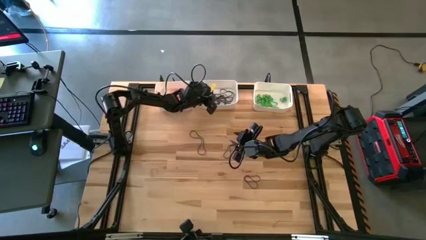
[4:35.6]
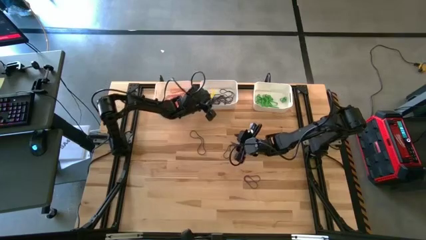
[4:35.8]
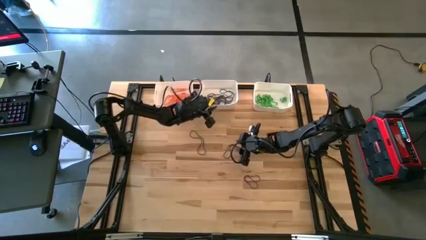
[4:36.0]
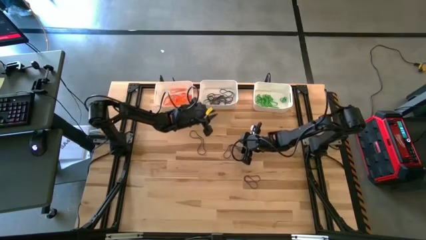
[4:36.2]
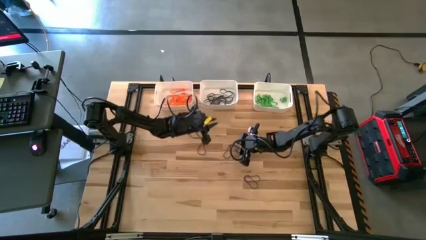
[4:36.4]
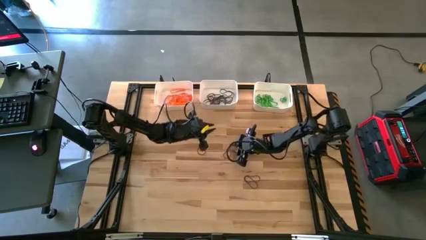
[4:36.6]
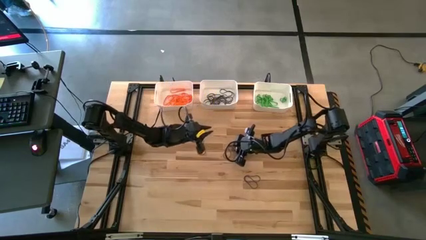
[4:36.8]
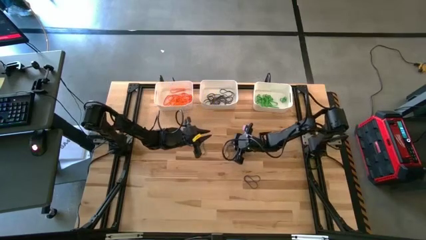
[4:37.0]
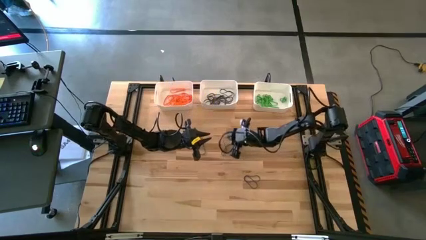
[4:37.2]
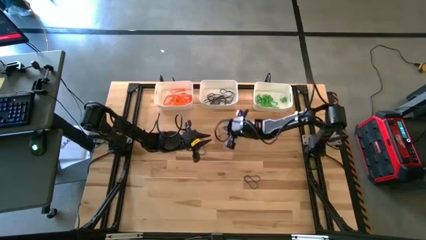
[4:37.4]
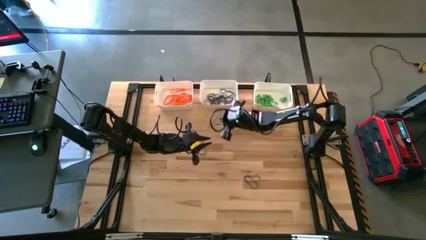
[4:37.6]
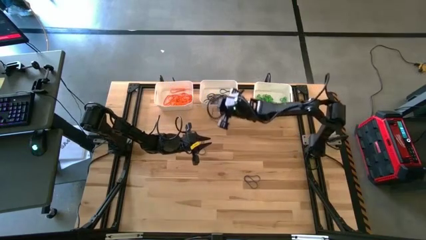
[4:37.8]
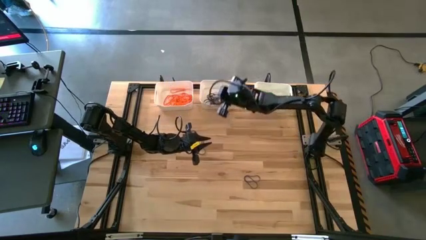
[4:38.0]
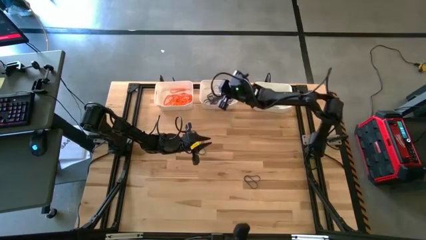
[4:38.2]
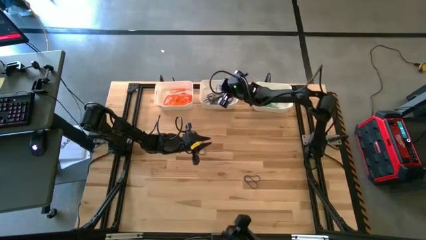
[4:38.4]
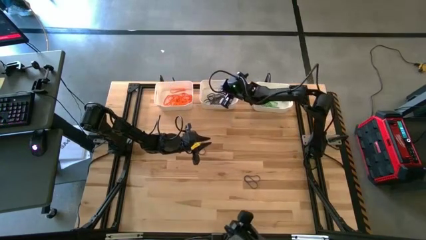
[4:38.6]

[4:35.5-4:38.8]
Task: Sort rubber bands into baskets
Put the purple rubber band into the middle white bin

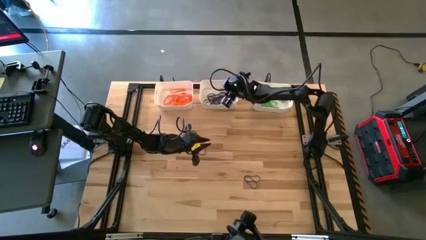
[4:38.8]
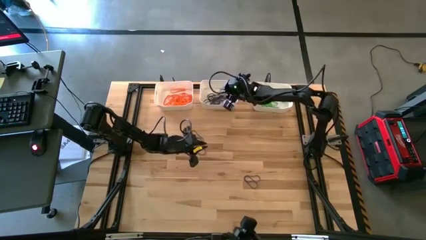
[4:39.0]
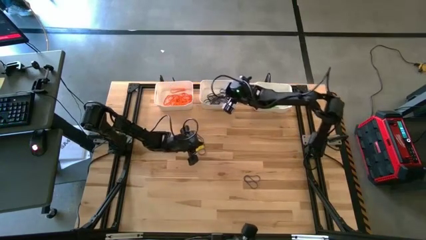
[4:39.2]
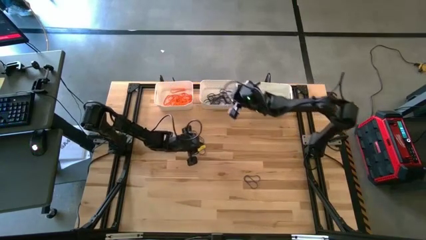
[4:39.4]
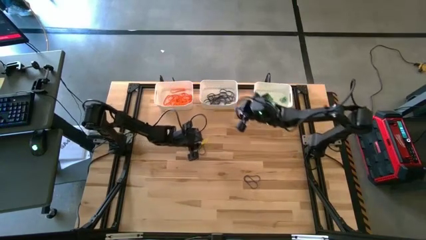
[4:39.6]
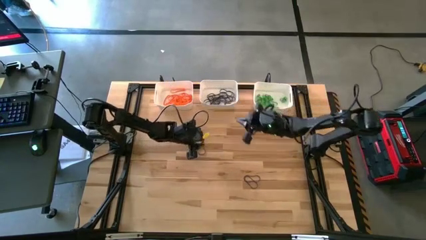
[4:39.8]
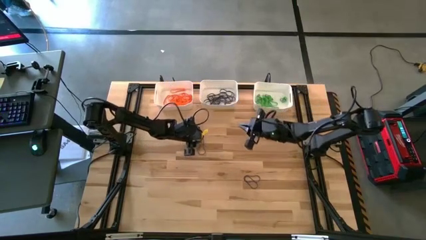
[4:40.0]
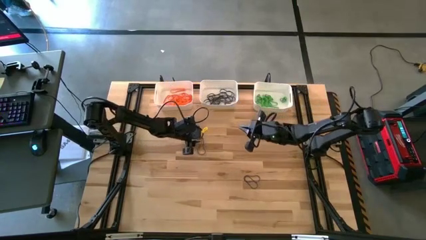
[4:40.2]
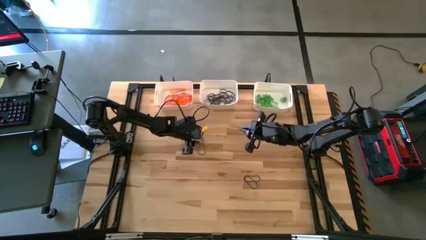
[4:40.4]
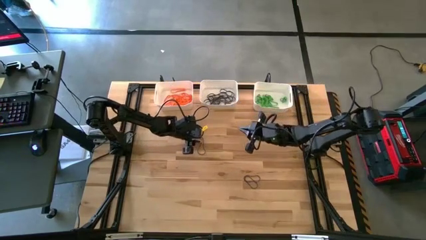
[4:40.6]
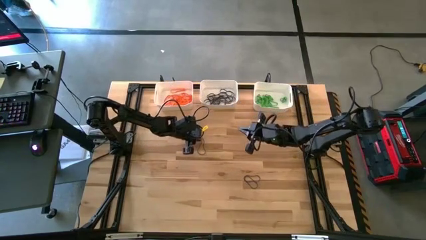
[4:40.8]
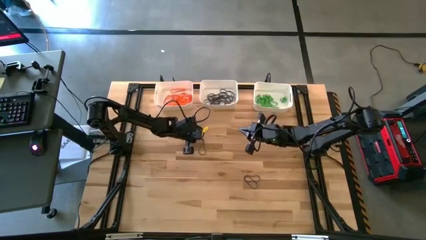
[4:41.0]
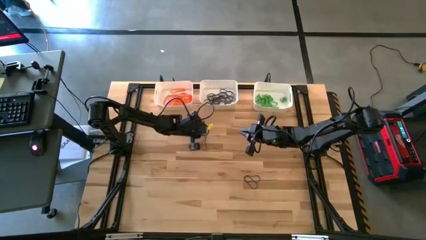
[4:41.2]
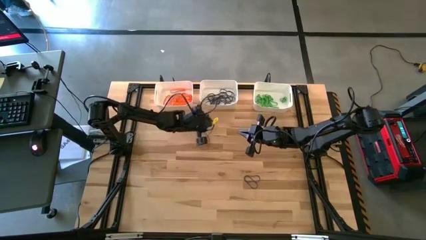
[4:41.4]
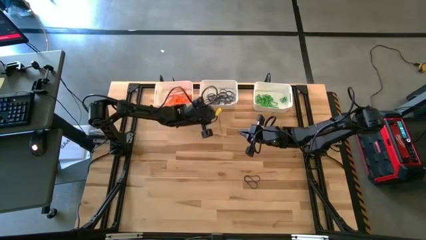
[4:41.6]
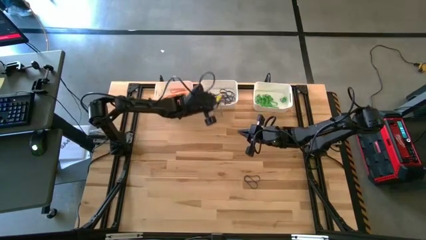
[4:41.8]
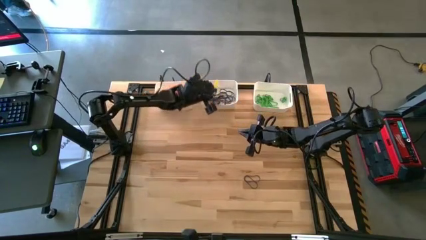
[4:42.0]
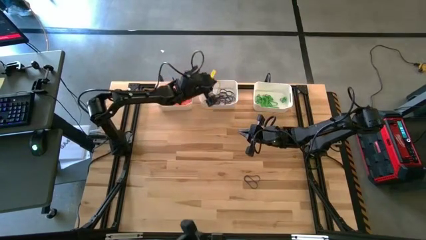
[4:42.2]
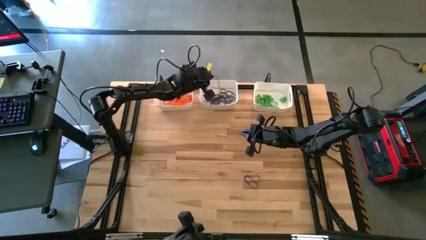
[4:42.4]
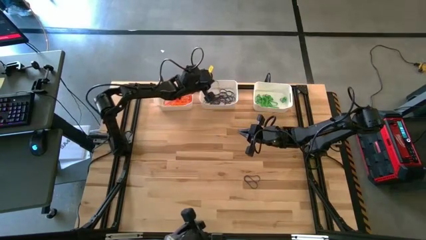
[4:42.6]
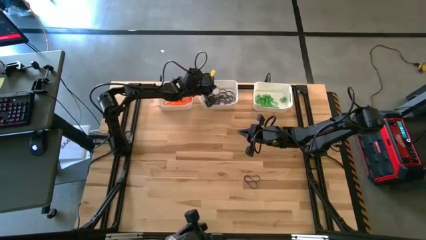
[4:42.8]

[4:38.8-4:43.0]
Put the purple rubber band into the middle white bin

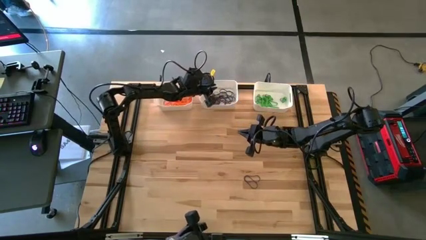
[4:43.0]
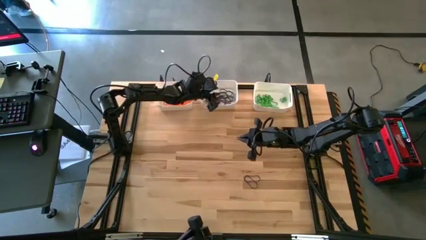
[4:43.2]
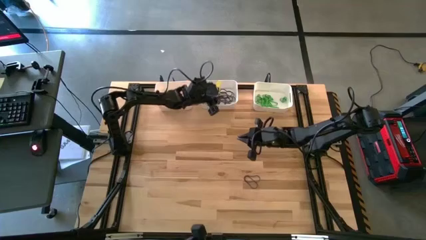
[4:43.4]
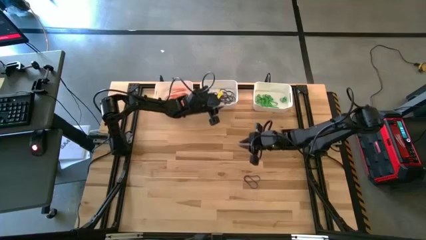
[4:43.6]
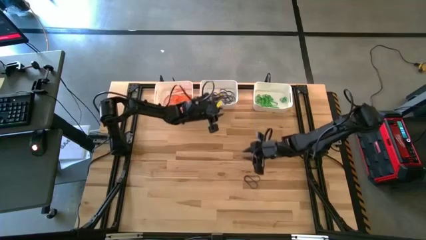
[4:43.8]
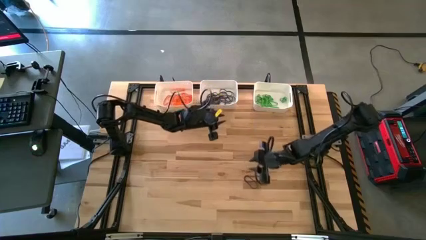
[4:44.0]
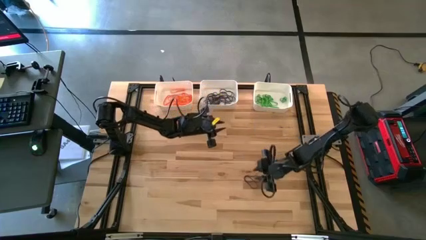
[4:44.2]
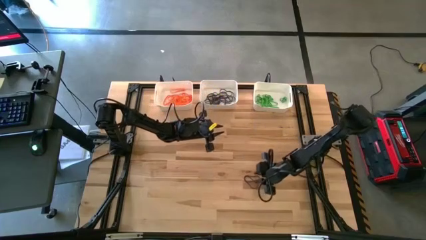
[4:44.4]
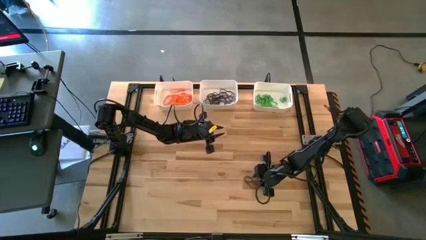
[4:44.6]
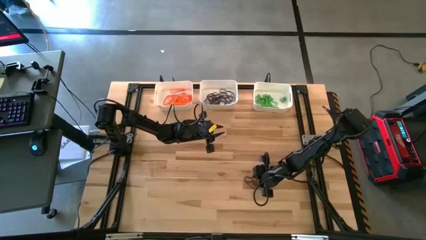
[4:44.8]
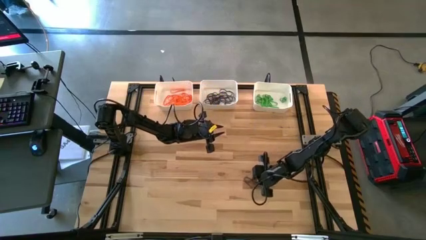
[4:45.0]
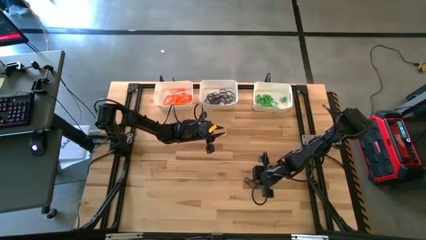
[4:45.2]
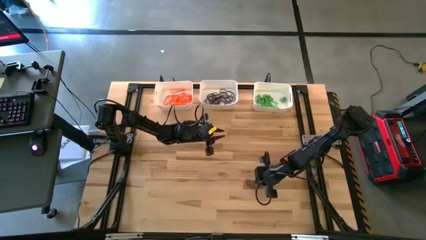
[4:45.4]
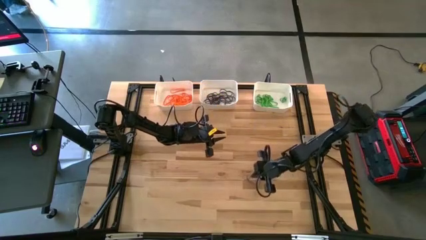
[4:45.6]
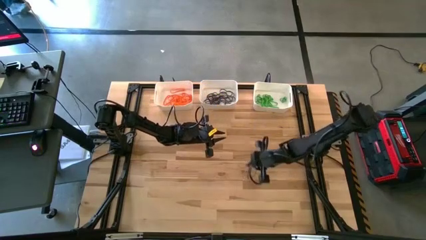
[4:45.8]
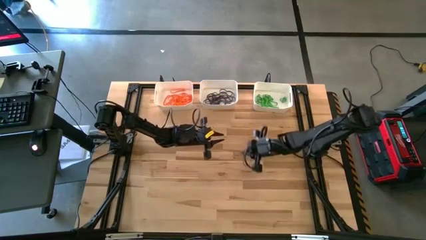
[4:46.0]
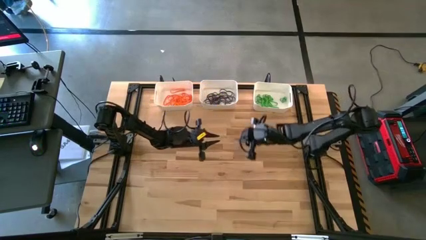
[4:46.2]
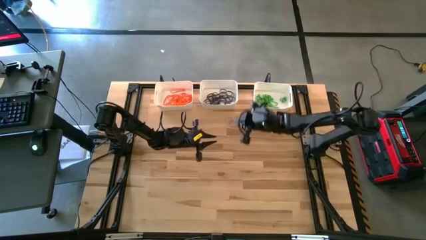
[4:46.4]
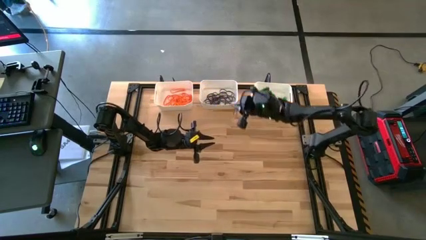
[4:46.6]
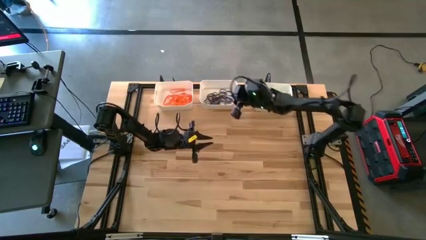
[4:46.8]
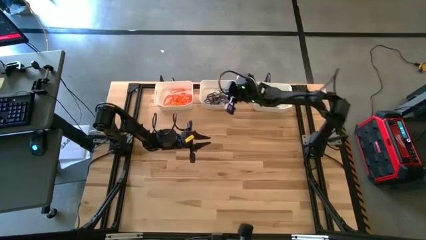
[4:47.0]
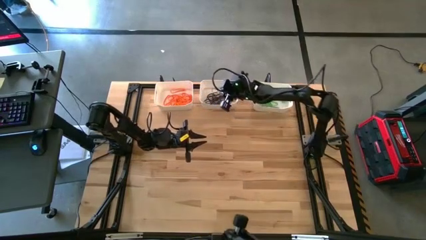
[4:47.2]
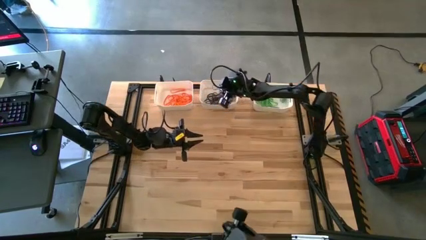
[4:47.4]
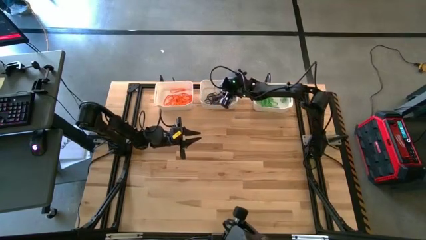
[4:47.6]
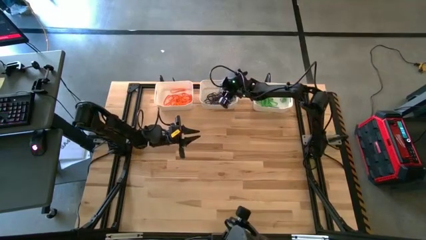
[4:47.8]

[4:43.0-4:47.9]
Put the purple rubber band into the middle white bin

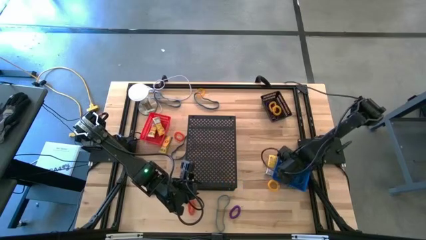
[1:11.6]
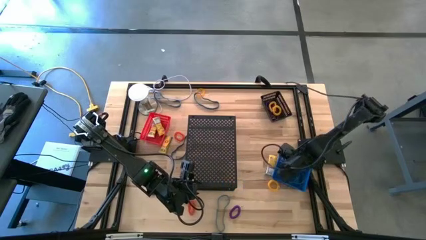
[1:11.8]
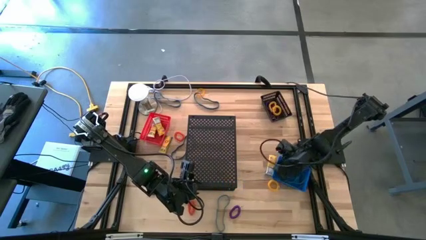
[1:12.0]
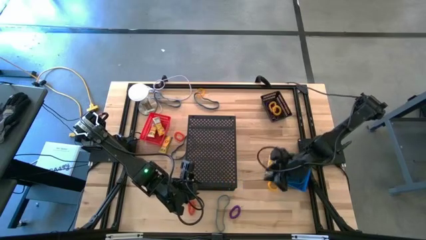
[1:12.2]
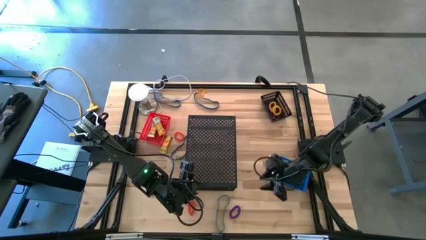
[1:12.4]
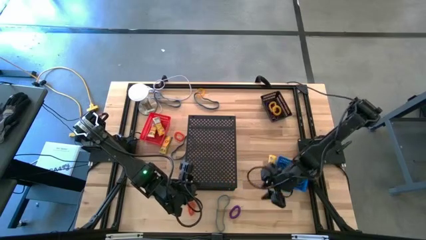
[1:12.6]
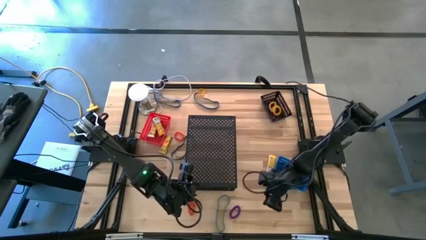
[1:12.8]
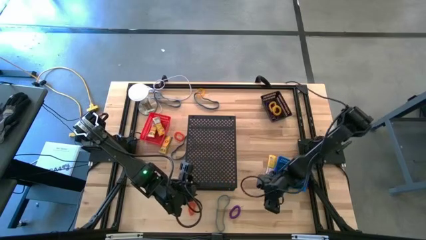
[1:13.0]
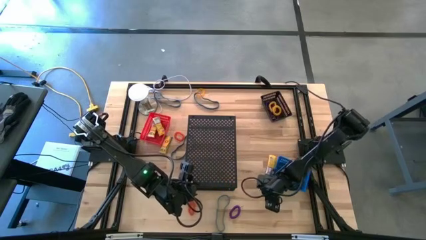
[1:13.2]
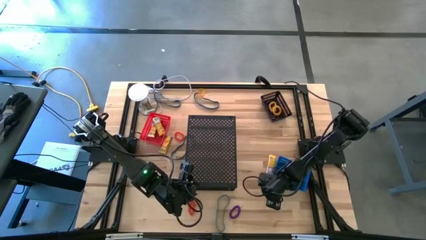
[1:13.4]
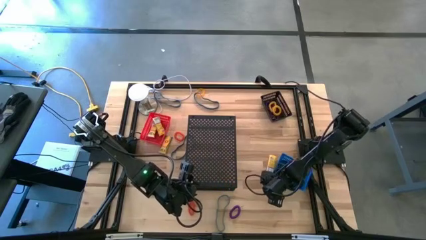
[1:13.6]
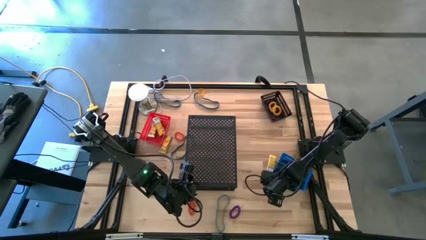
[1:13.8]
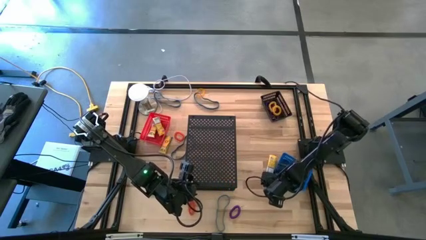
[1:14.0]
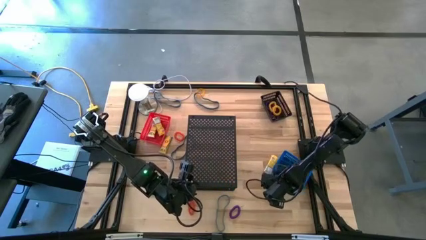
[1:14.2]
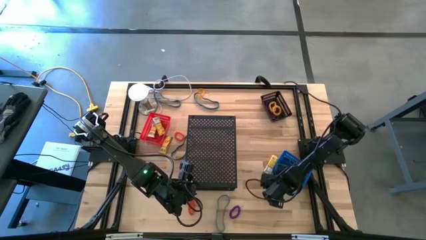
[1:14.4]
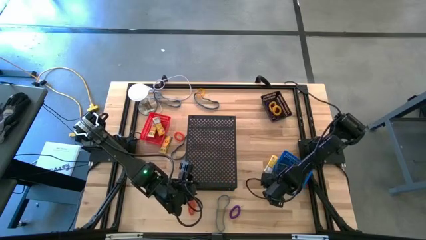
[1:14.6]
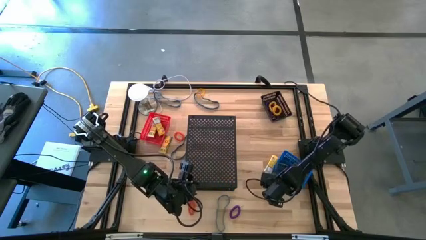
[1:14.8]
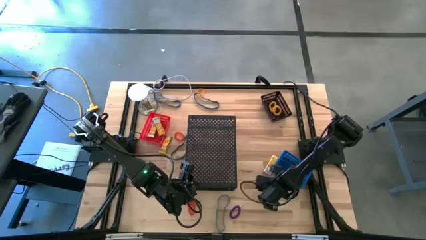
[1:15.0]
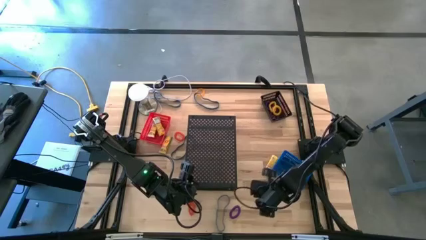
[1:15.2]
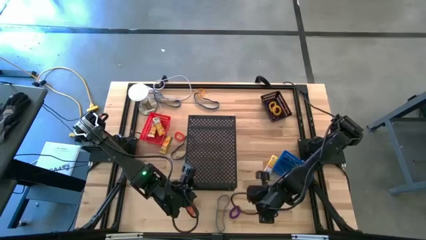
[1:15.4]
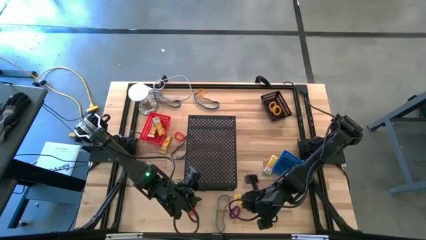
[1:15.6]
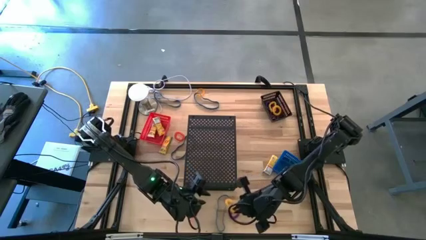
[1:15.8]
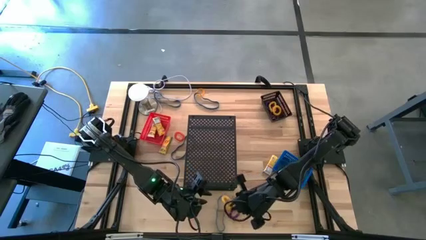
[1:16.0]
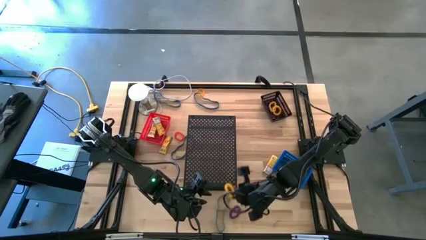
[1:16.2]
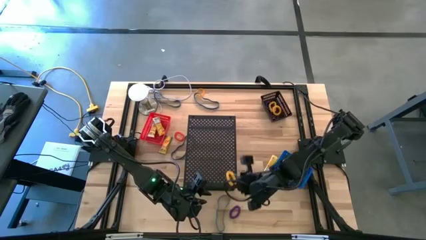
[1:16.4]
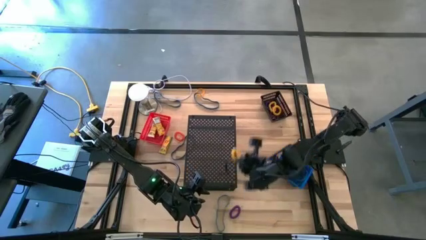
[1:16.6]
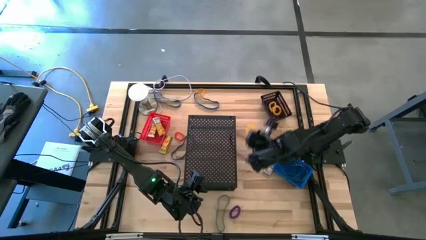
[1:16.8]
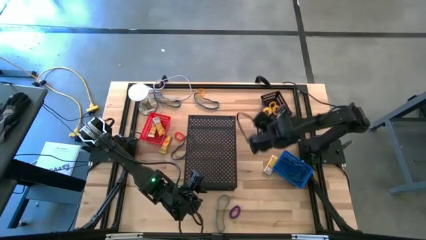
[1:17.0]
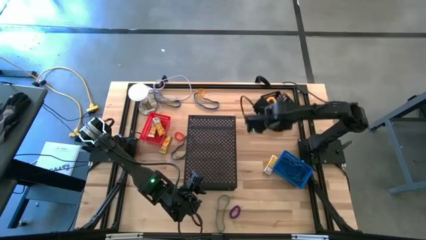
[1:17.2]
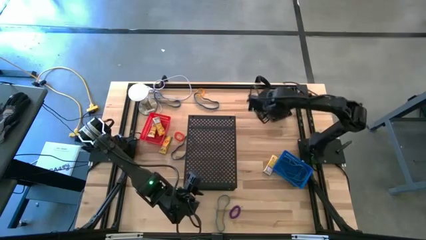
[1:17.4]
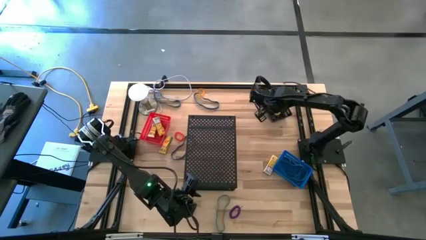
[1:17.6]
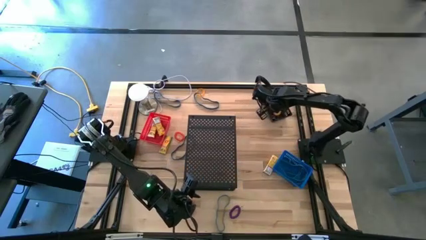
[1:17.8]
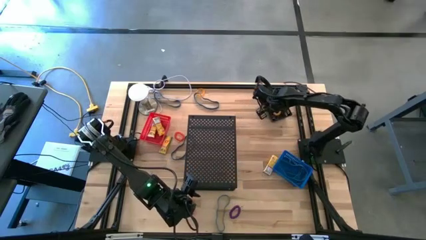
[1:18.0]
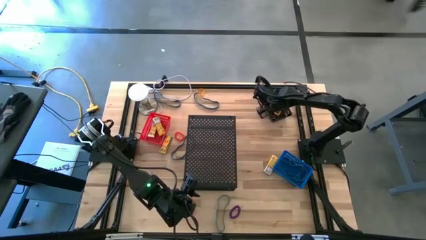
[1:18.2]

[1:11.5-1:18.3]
Task: Pick & Place Office Desk Supplies
Put the yellow spring keychain into the black bin
